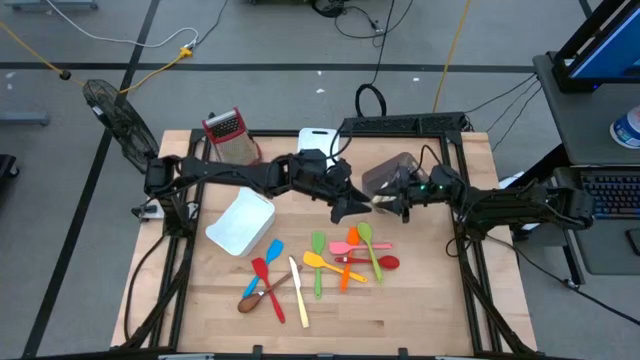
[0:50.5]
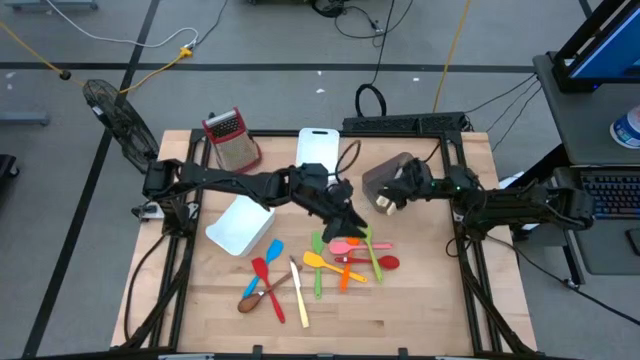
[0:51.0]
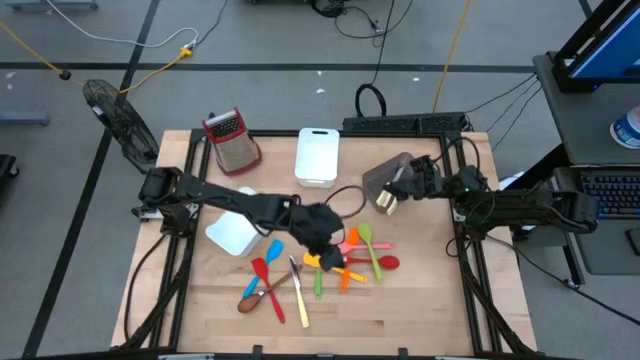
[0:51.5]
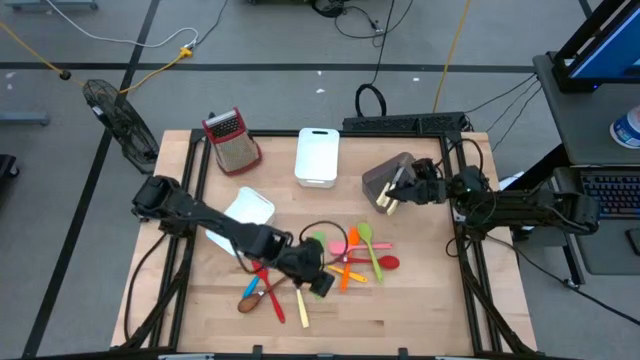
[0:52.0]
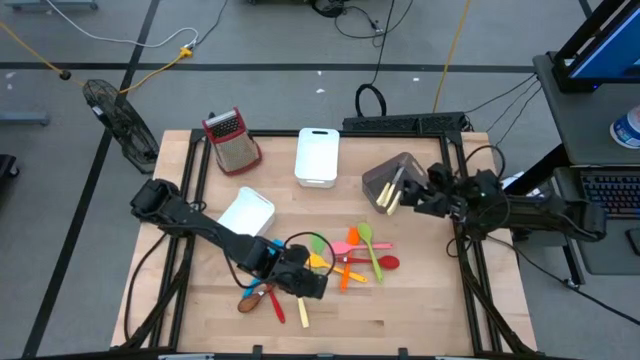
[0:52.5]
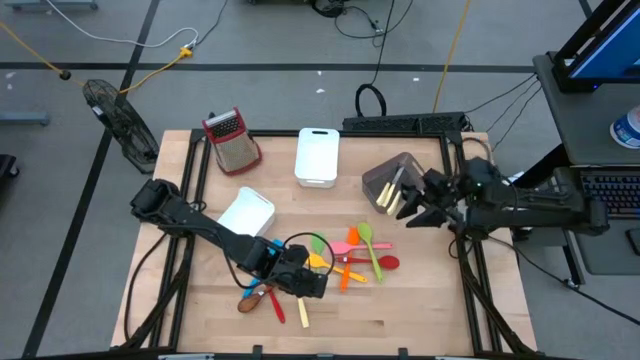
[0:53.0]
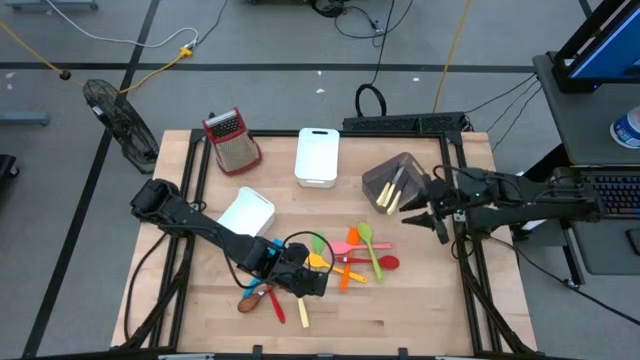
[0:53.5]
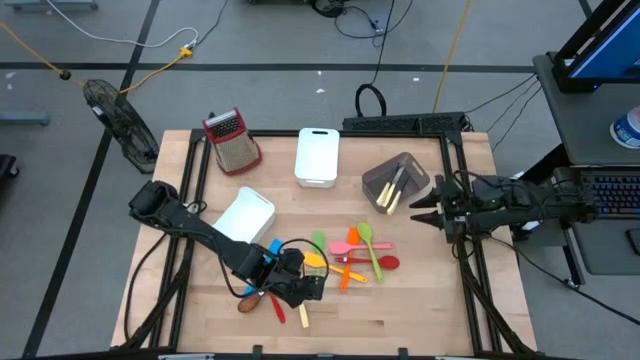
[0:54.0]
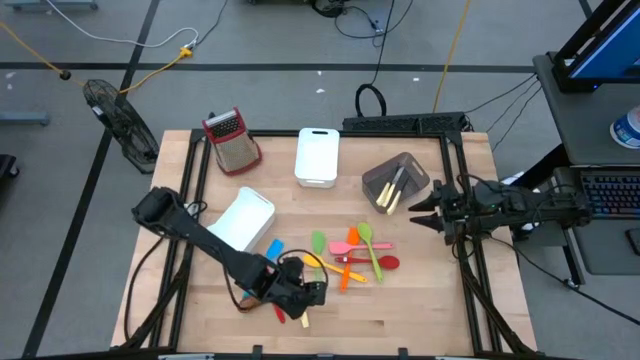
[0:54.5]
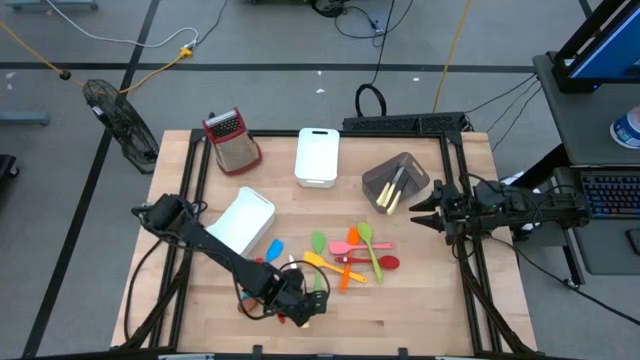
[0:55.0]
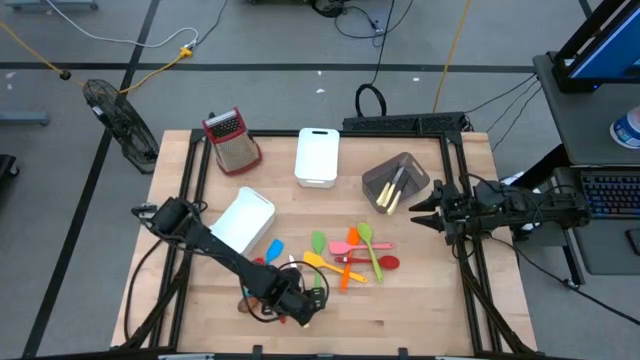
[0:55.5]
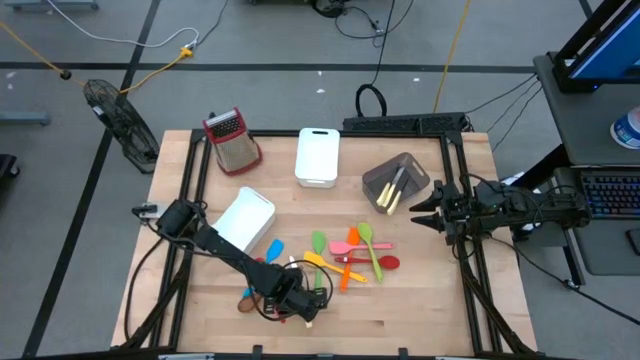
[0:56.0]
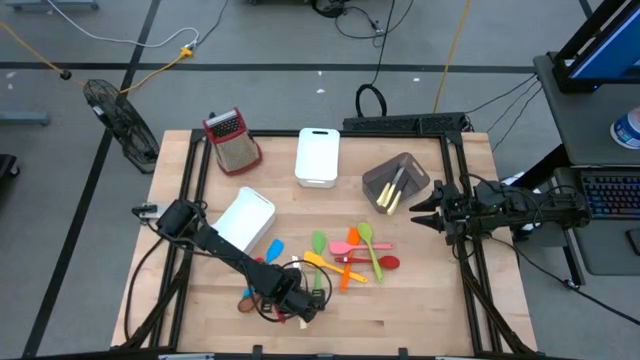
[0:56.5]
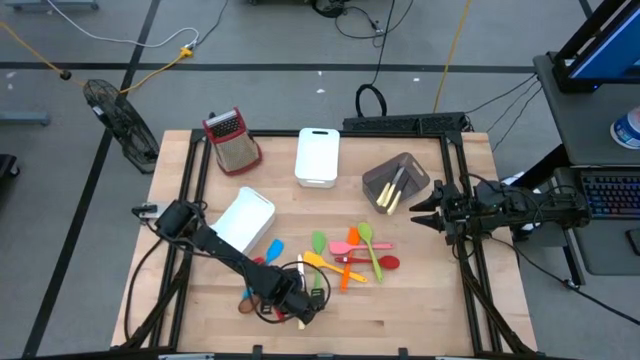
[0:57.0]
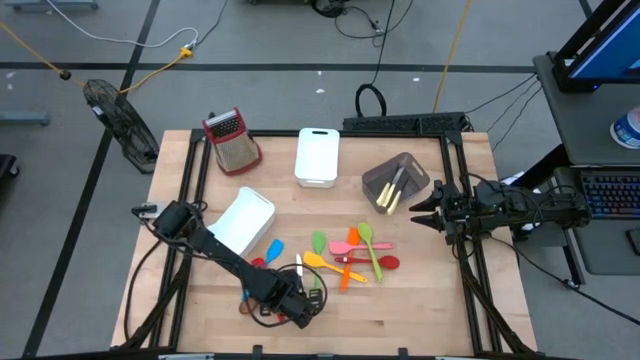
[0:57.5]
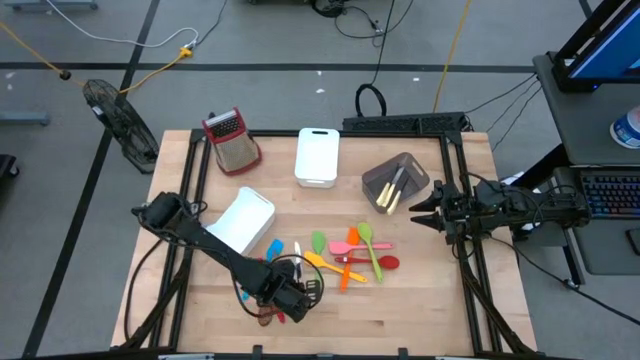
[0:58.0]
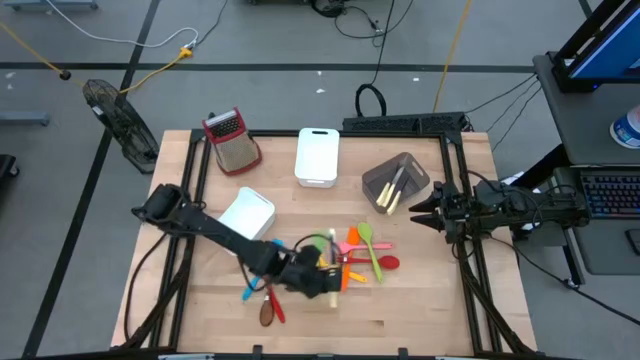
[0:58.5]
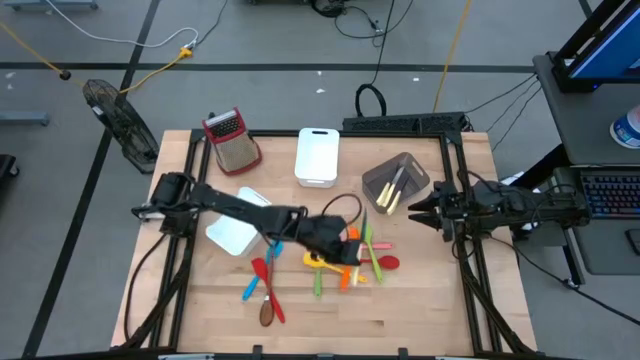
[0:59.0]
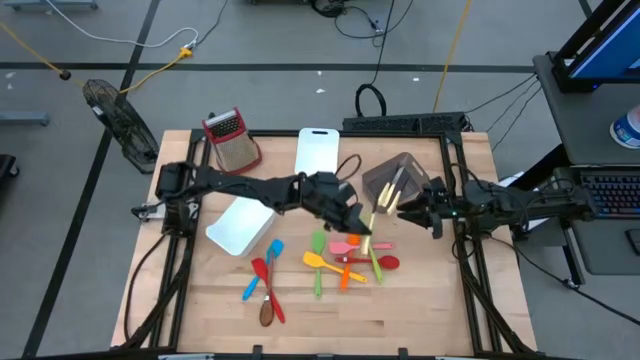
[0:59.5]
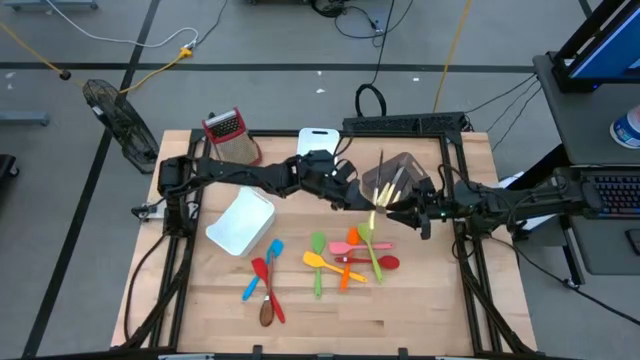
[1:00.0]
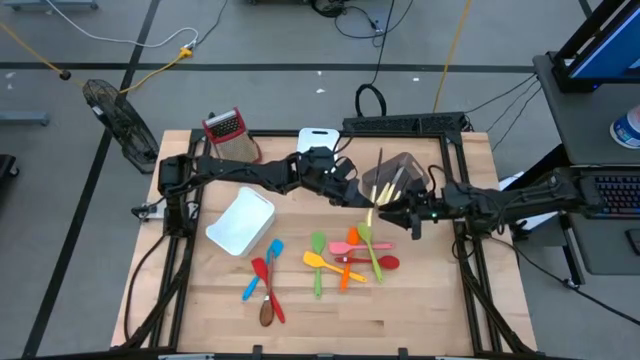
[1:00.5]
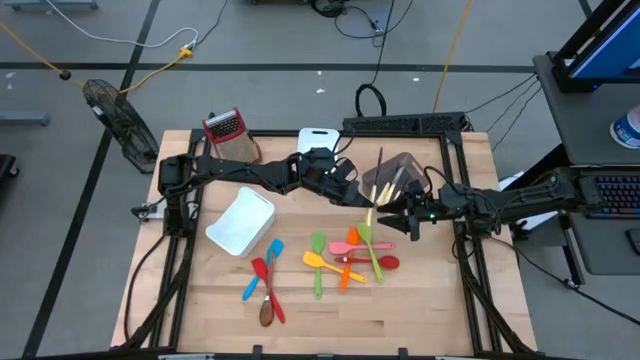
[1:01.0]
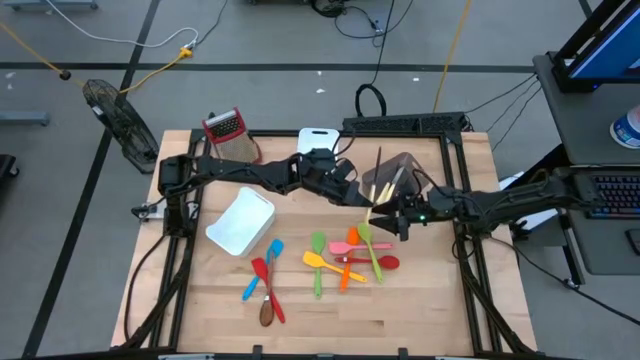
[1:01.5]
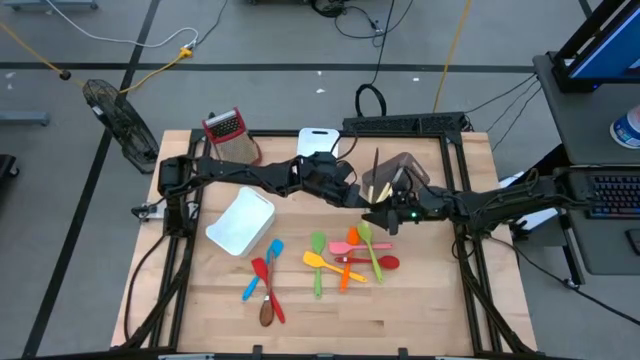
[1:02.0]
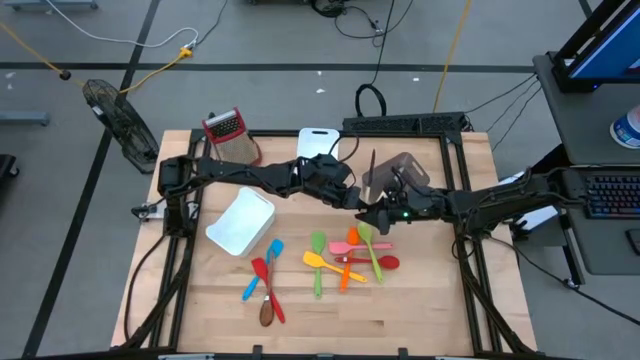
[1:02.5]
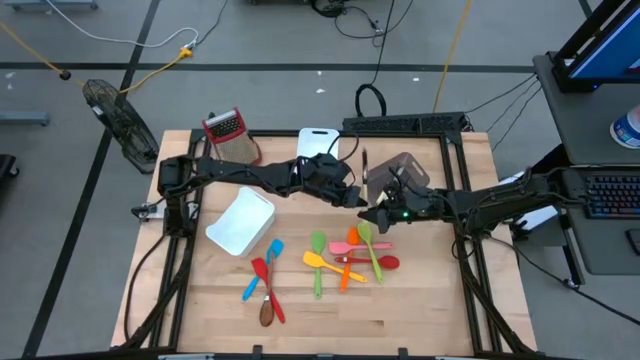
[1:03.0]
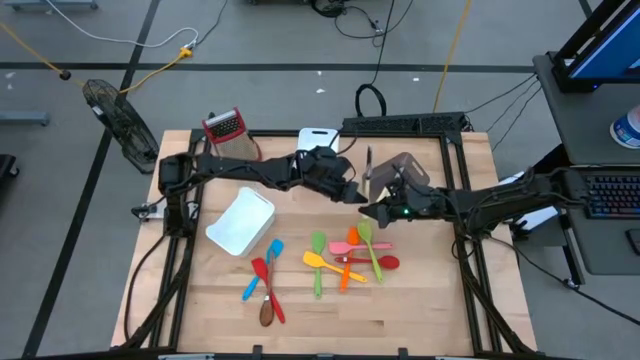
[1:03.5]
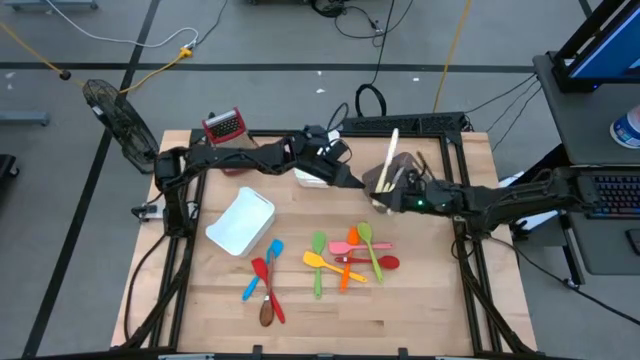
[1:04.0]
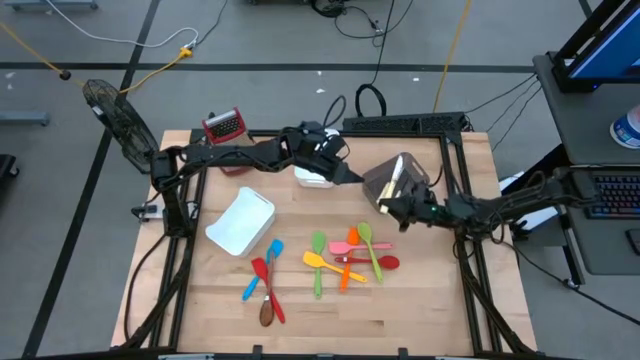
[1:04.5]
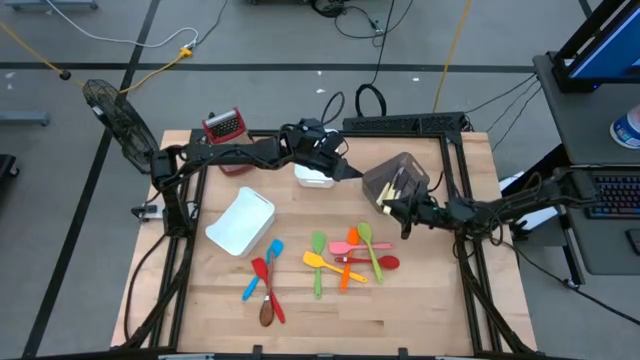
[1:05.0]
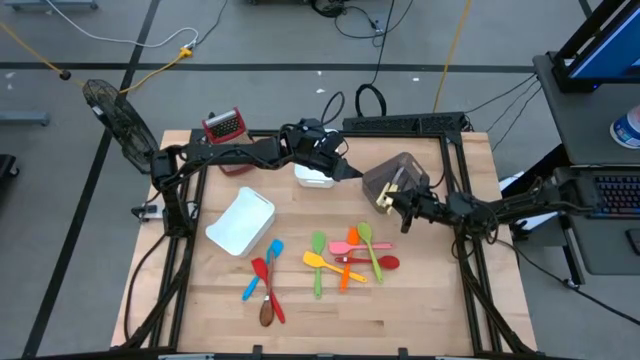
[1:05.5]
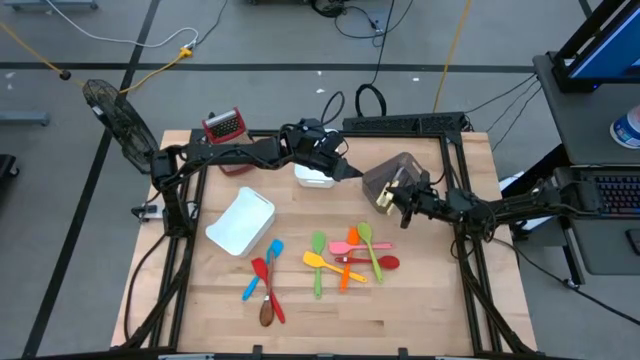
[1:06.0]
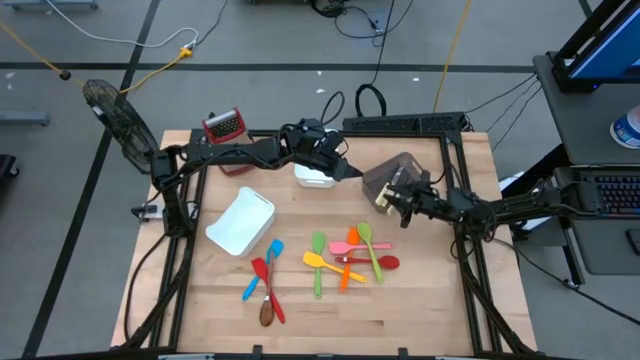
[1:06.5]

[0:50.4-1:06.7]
Task: Pick & Place Kitchen Items
Put the yellow table knife into the black bin

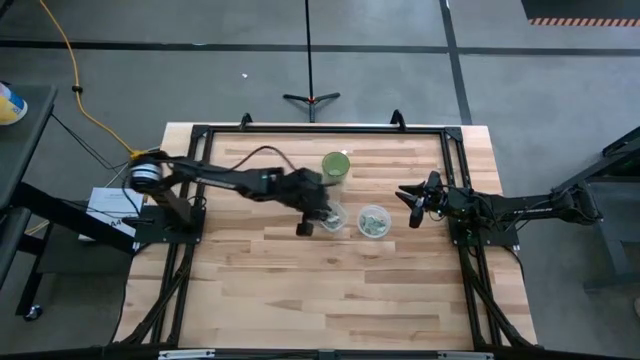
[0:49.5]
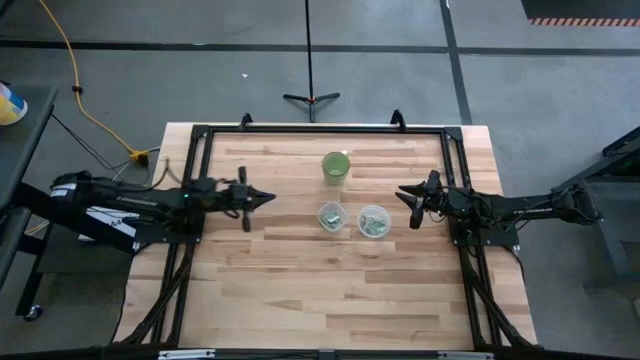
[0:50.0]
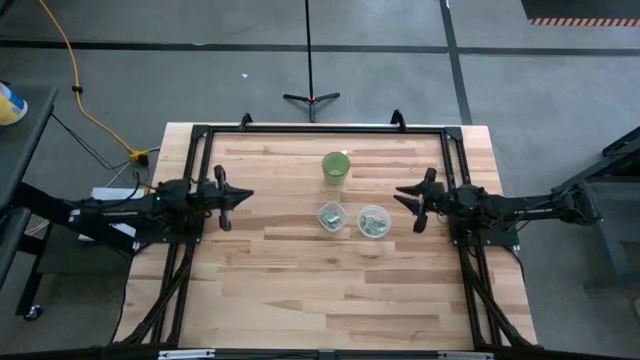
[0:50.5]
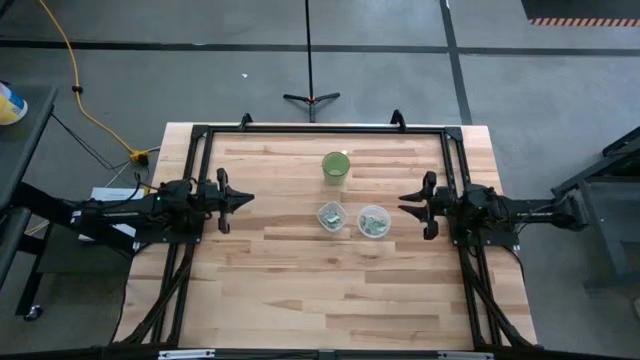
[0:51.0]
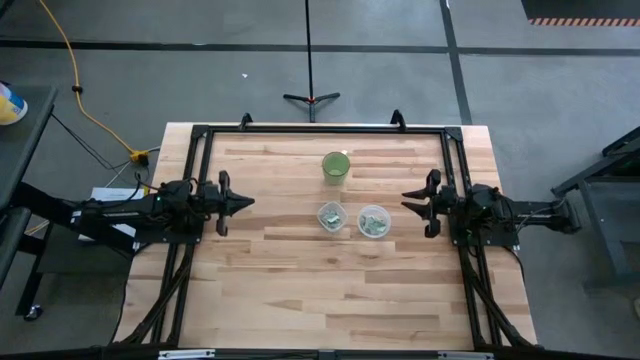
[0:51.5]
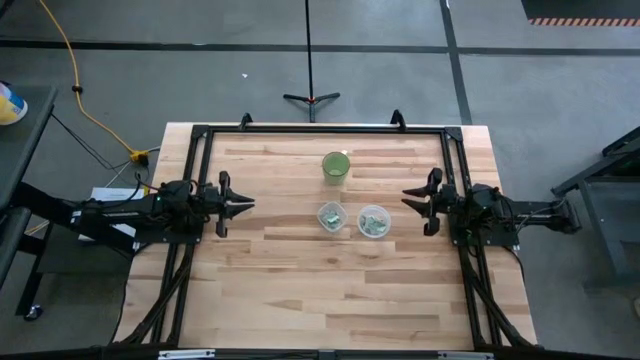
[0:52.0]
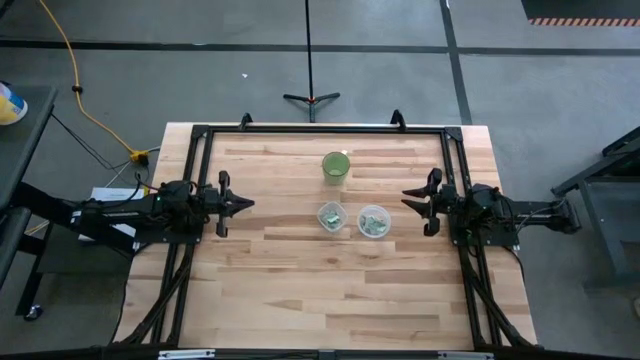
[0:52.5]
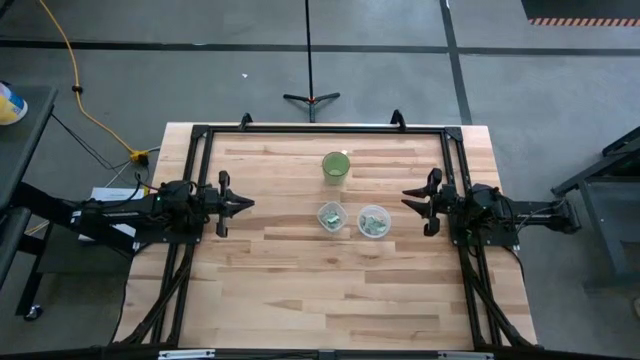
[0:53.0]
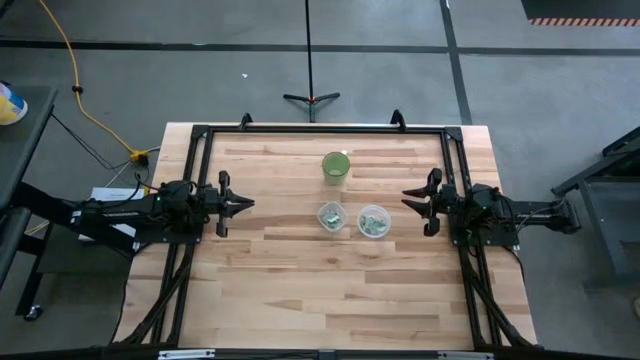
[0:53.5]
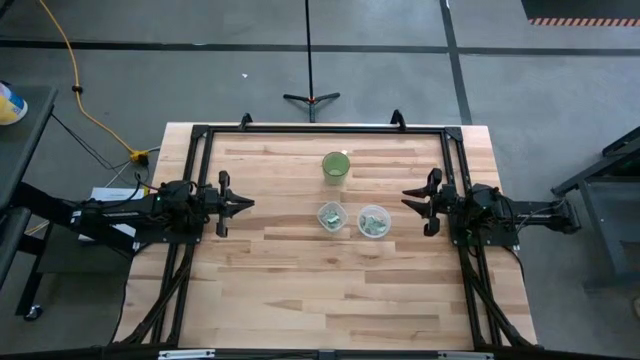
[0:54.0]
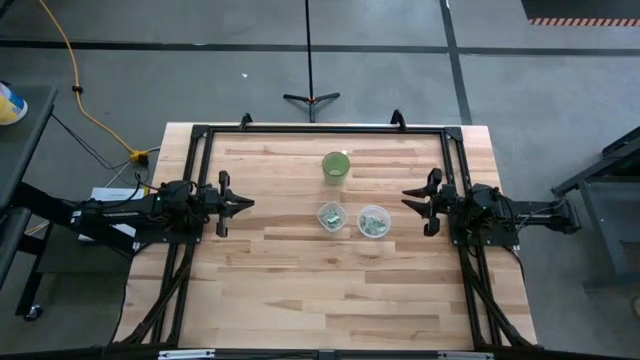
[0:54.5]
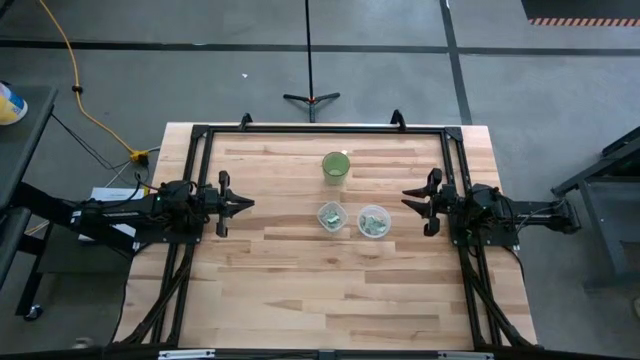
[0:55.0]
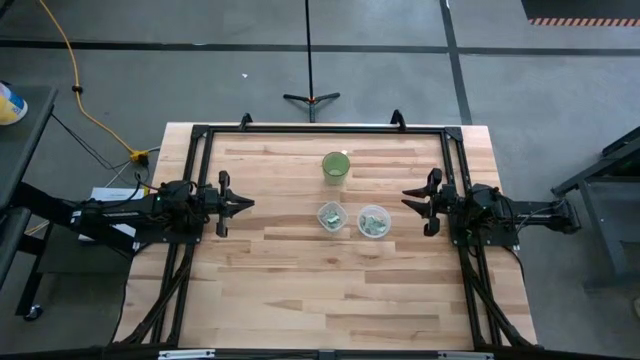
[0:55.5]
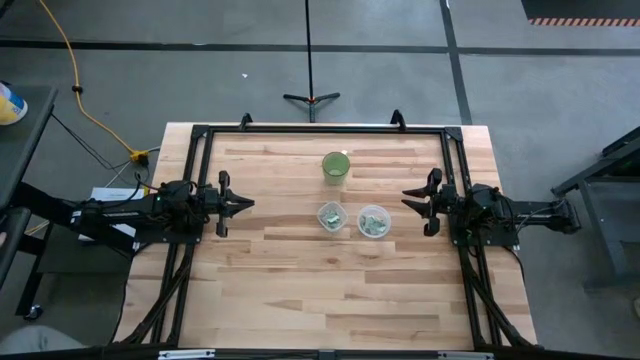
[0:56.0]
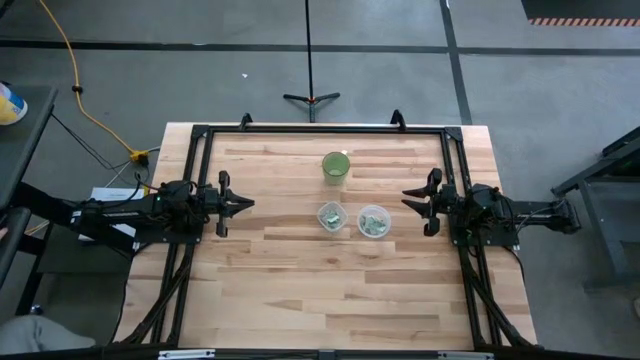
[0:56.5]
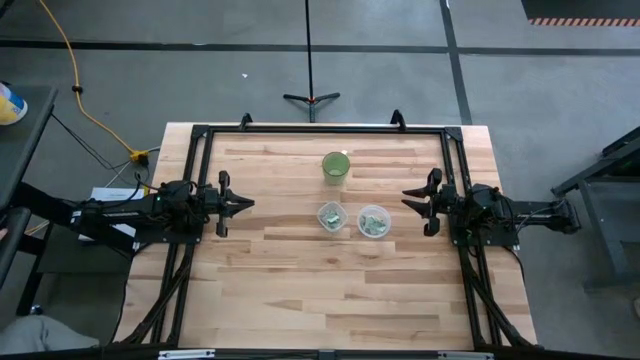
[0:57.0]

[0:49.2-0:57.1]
Task: Pick and place items into bin
Return to Home Position
